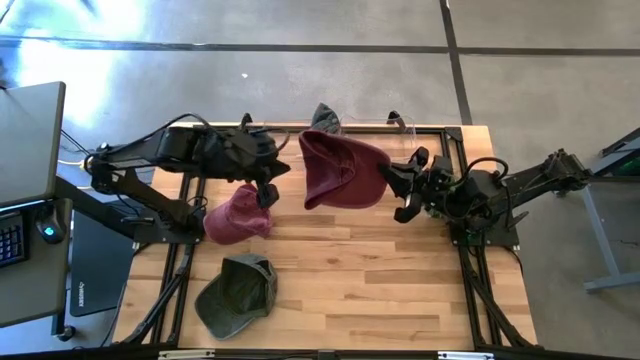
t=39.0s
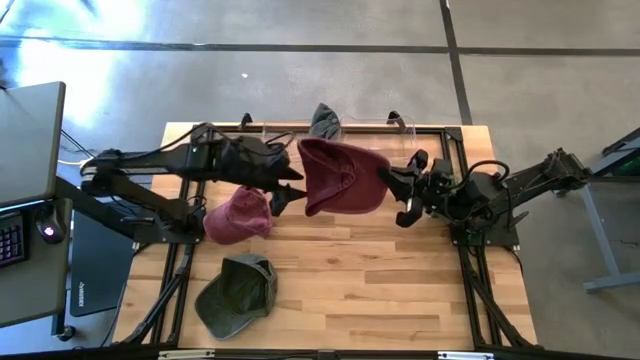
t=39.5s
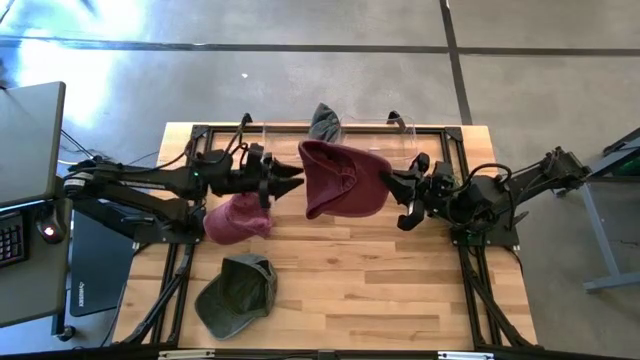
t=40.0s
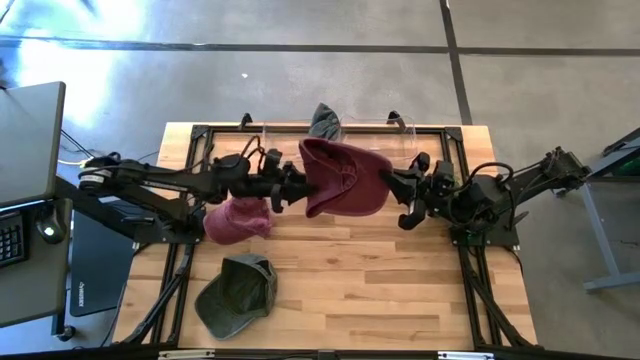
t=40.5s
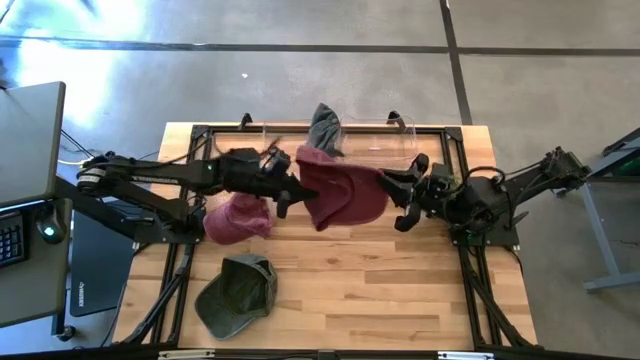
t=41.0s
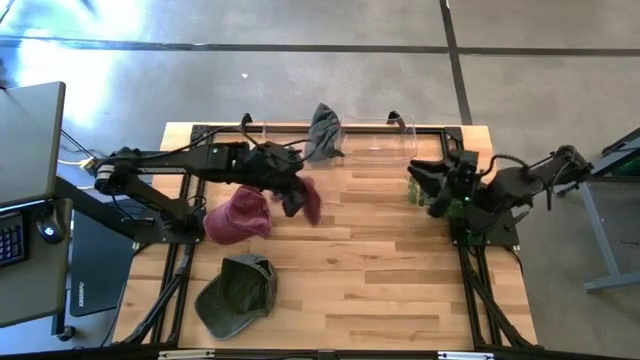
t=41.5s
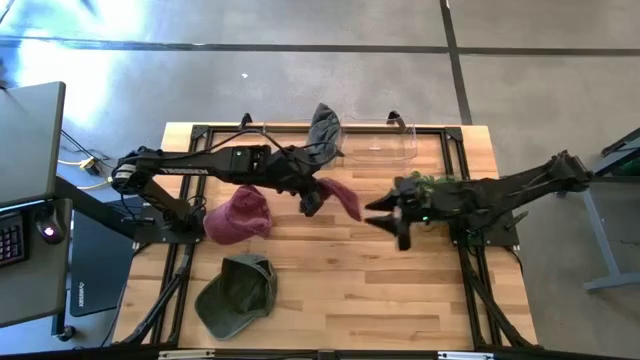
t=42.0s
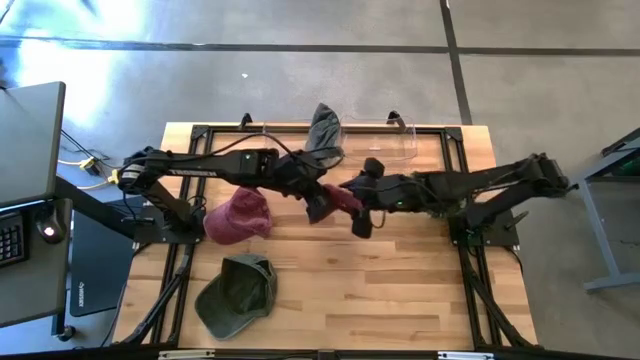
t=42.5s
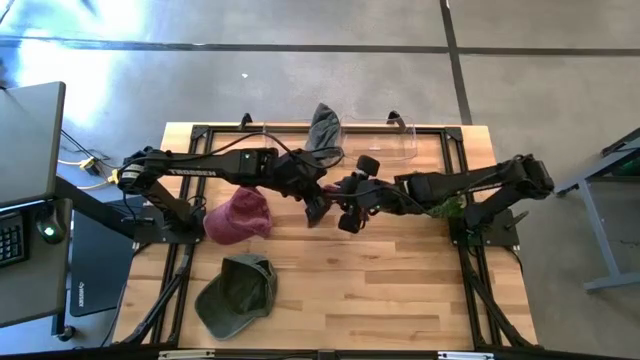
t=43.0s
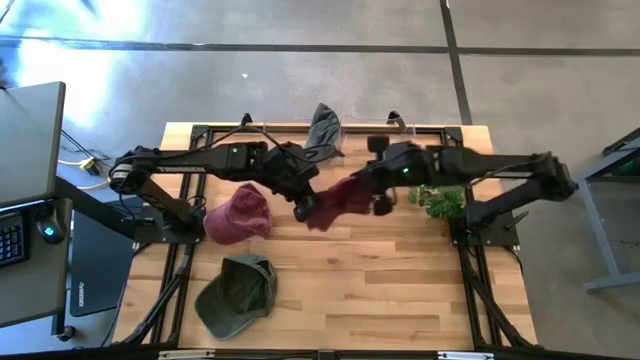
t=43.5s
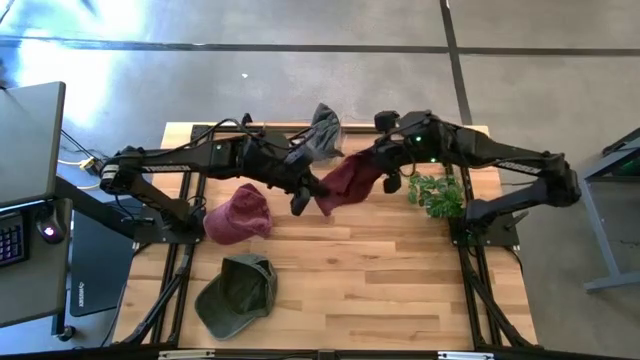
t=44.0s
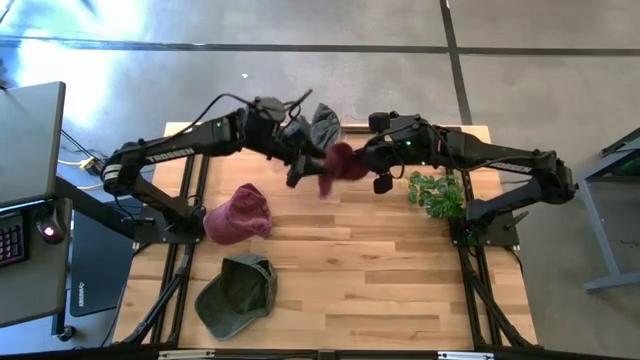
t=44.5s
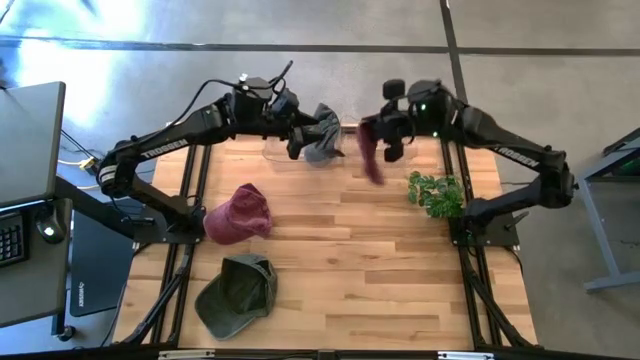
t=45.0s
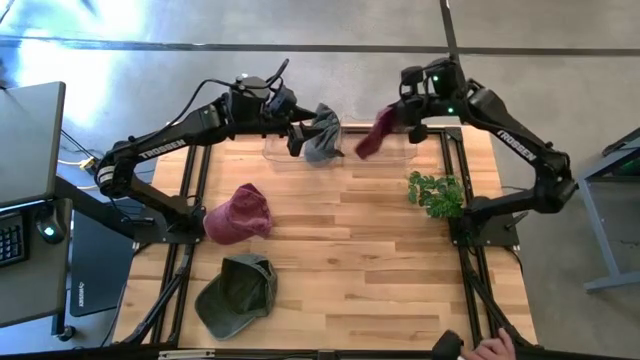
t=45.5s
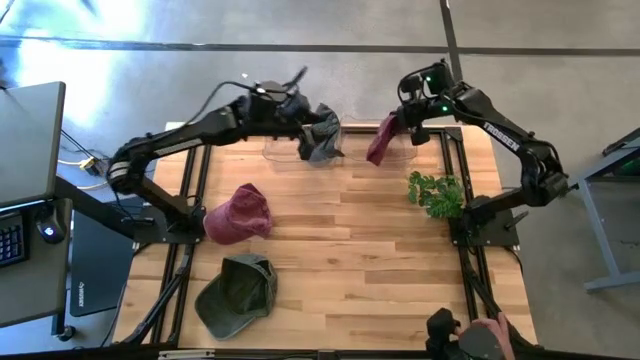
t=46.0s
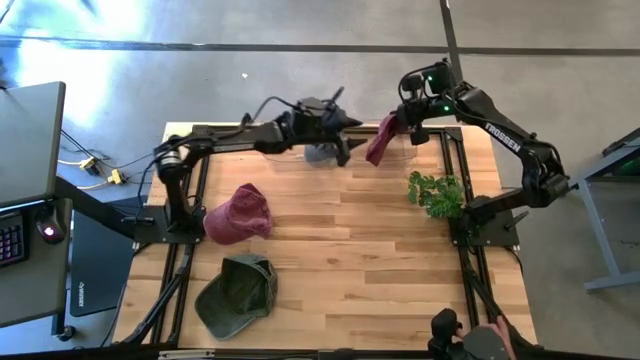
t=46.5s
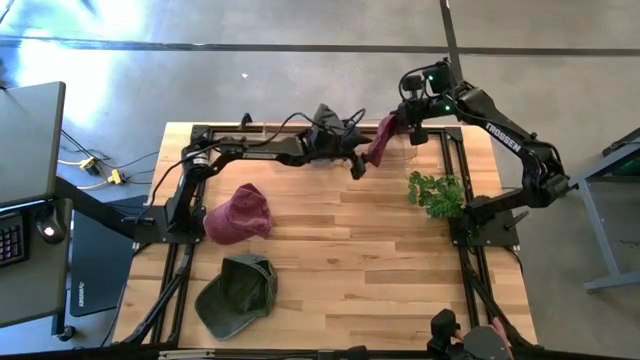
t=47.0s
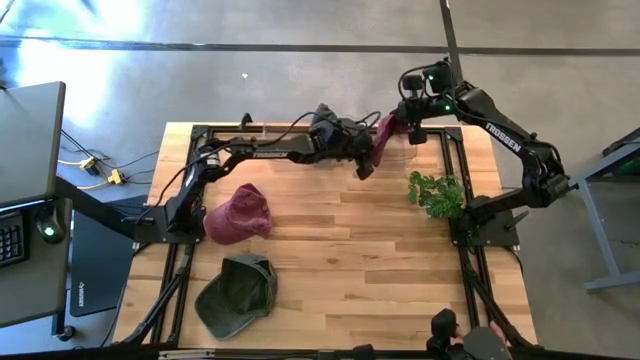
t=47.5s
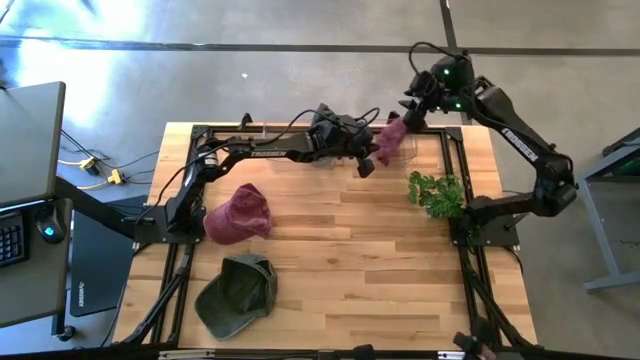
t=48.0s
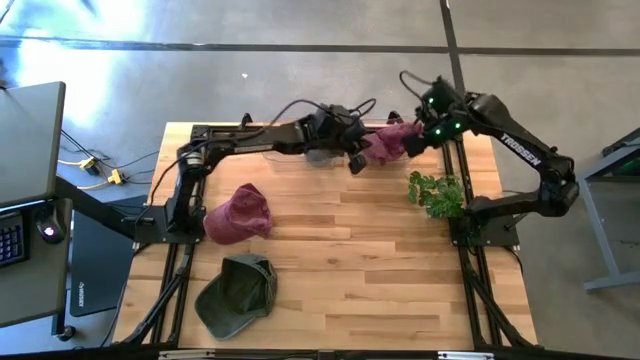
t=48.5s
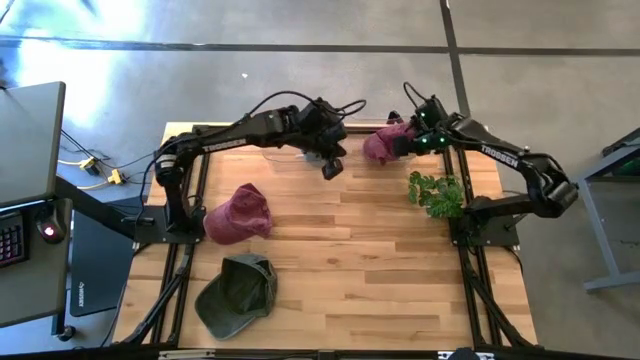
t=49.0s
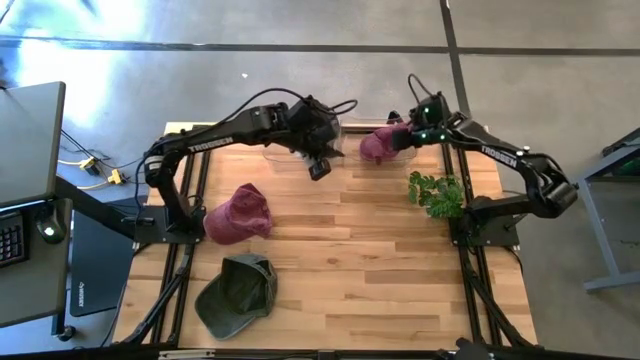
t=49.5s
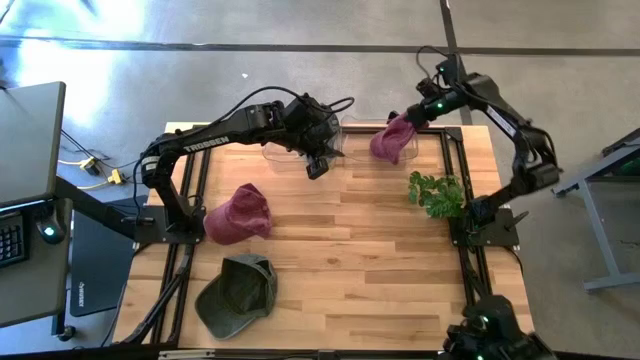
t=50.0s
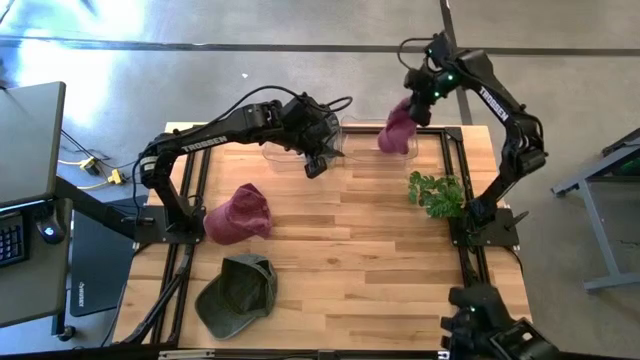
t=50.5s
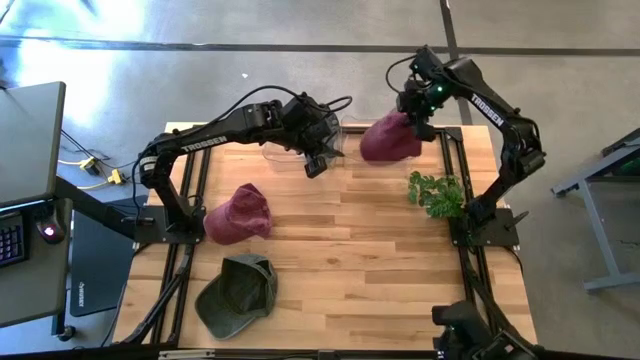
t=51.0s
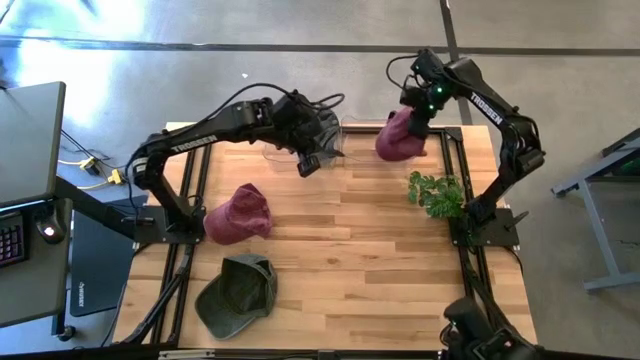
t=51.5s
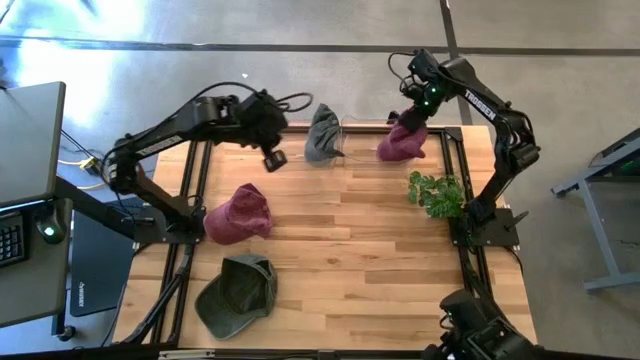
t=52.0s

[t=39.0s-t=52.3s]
Task: Pick & Place hat
Put the right red cap into the right transparent bin

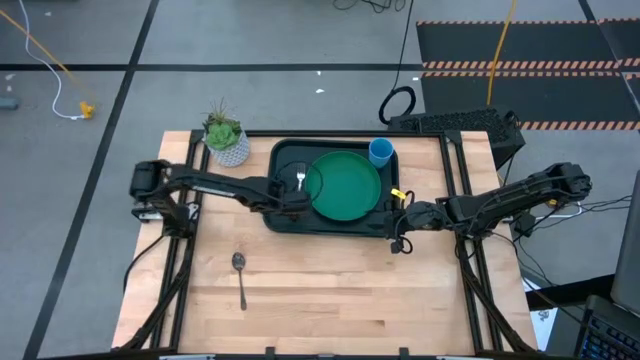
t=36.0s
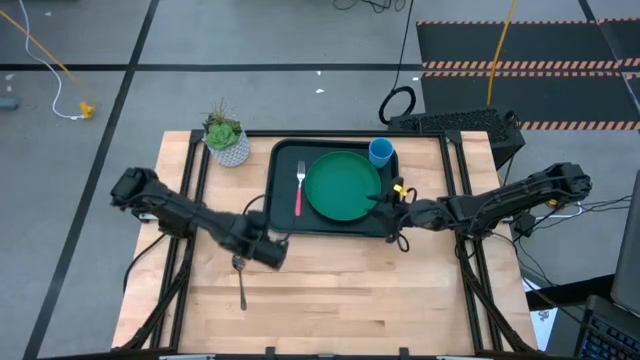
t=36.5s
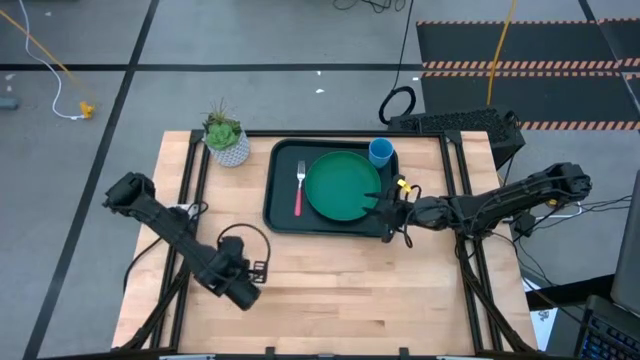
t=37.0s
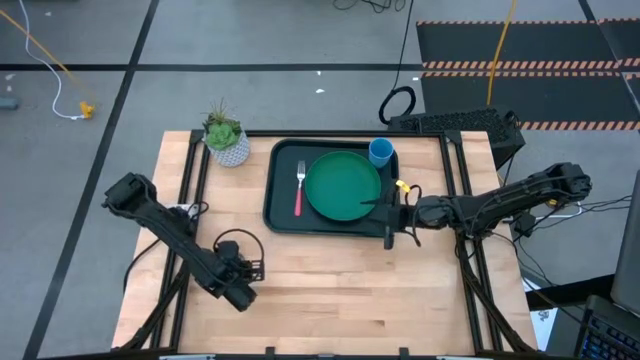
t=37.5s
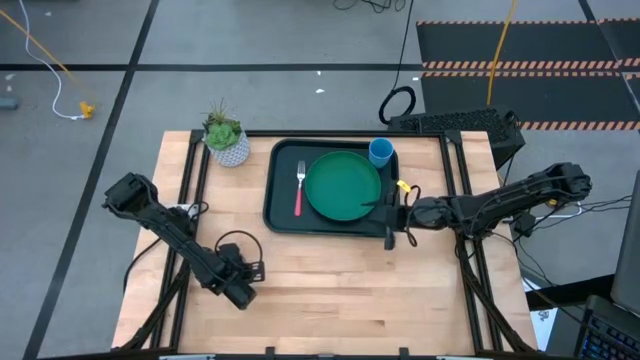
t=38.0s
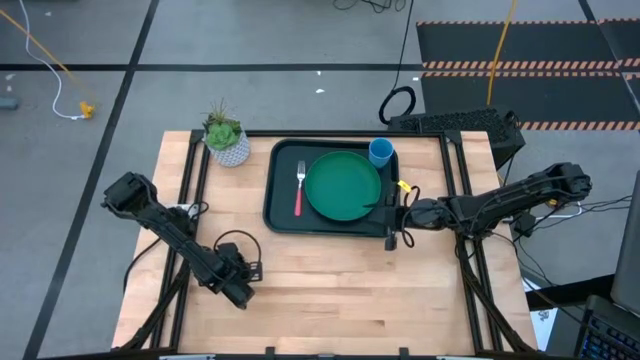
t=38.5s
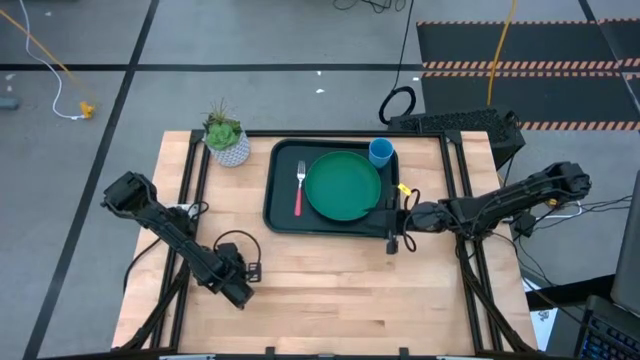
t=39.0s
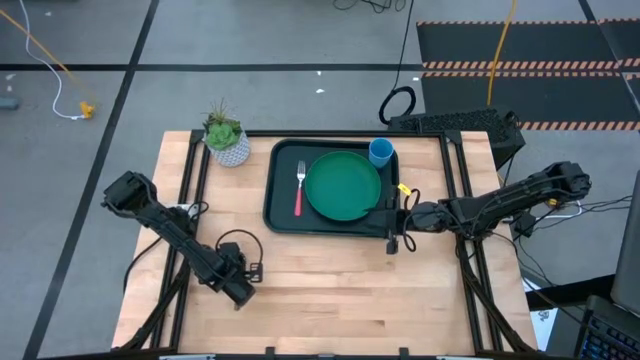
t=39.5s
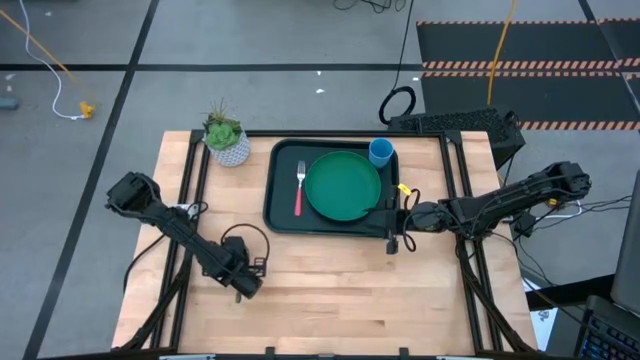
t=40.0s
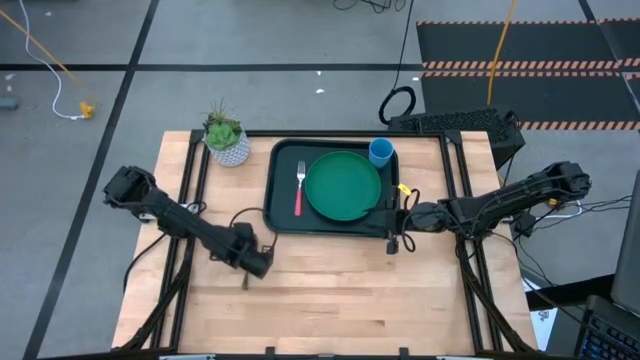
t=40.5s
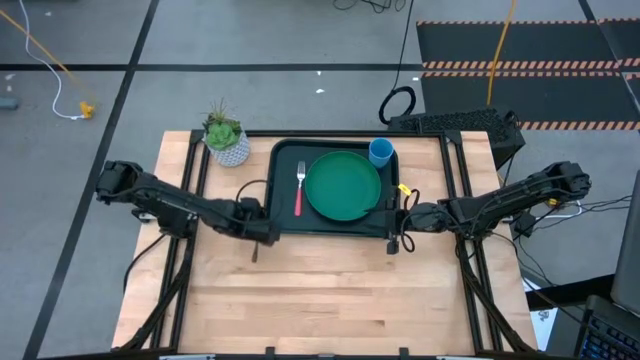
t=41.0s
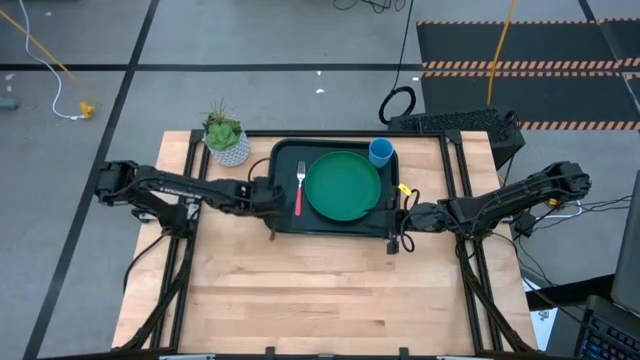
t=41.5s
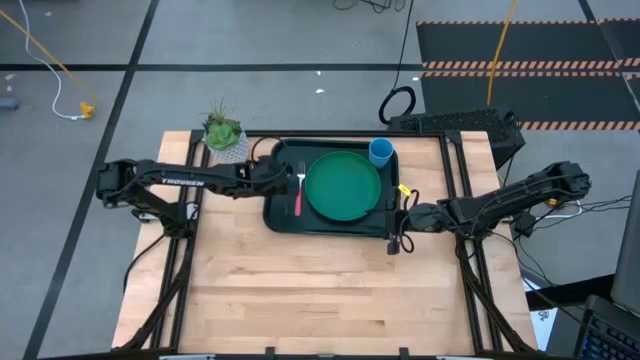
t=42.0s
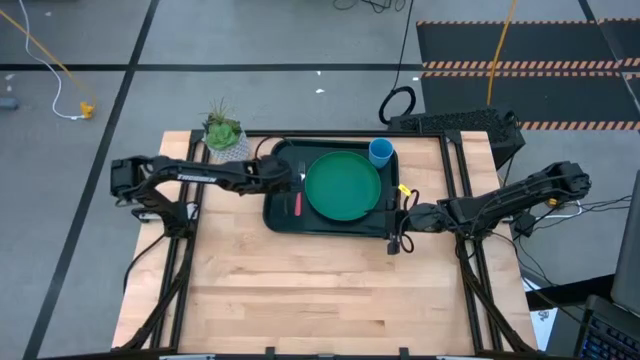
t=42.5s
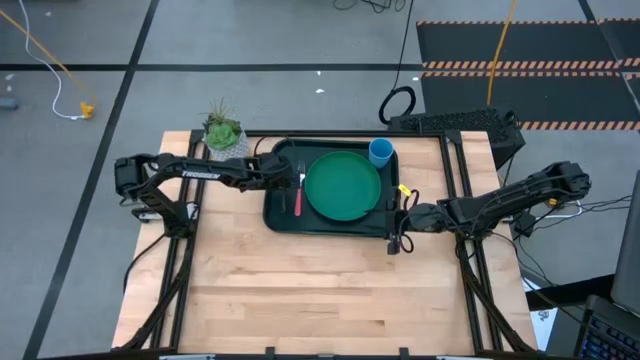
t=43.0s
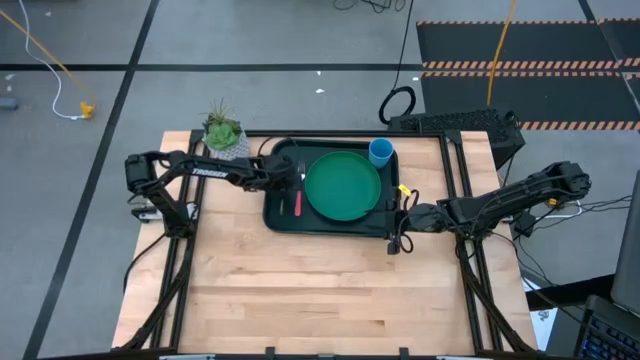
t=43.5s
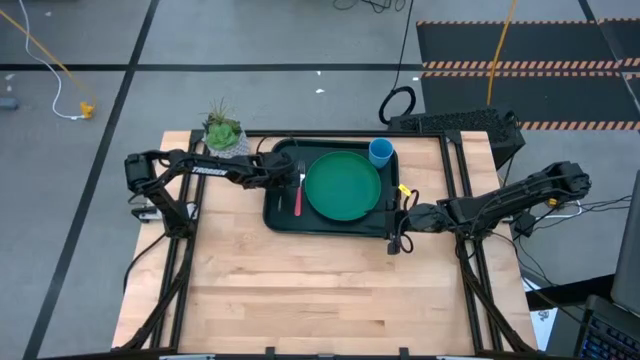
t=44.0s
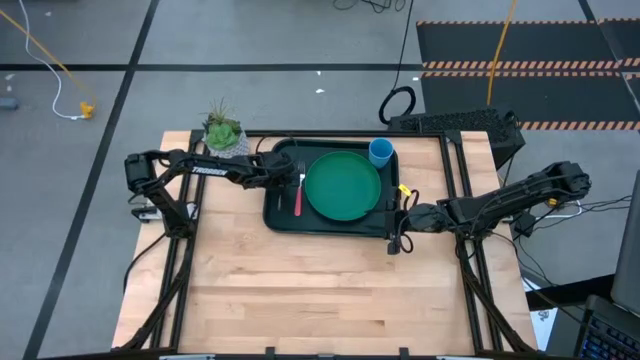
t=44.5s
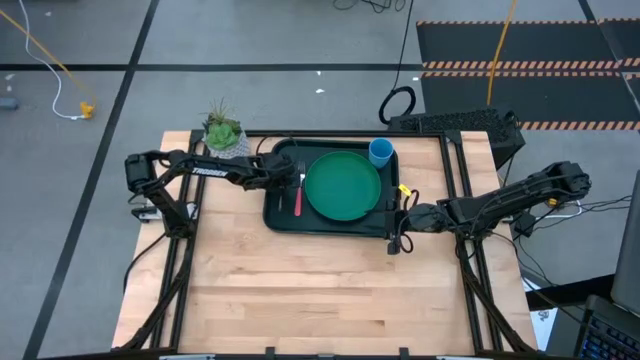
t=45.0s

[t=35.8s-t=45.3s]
Task: Pick and place plate/cup/fork/spoon on tray
Put the black spoon on the black tray to the left of the orange fork
